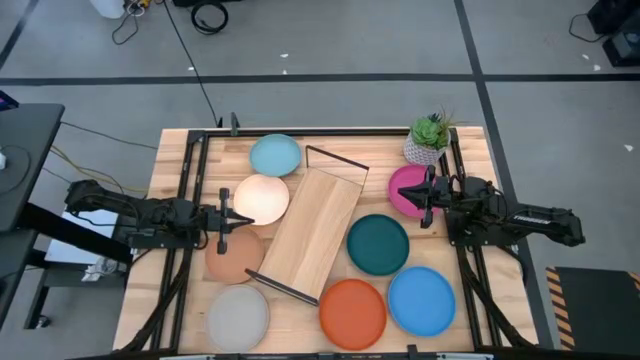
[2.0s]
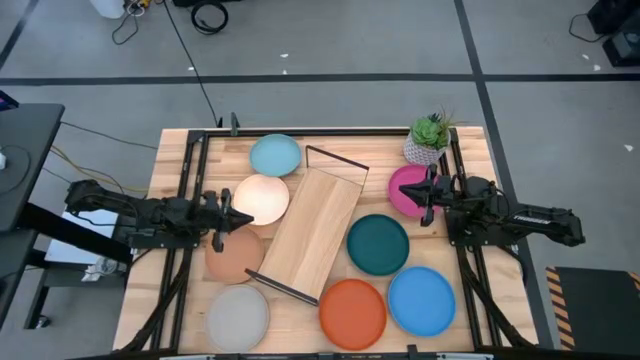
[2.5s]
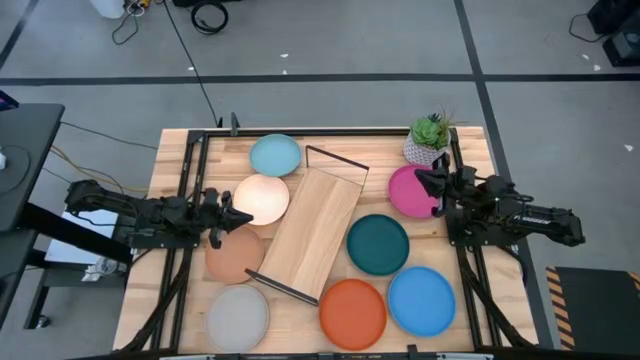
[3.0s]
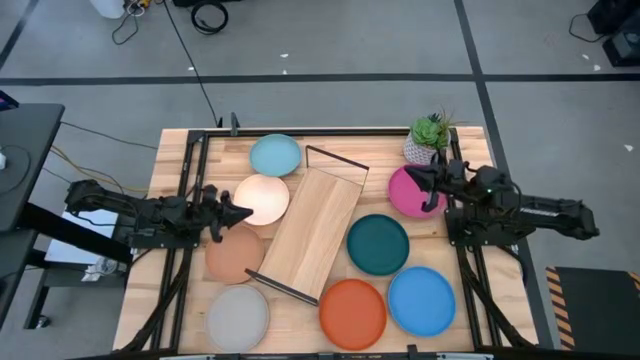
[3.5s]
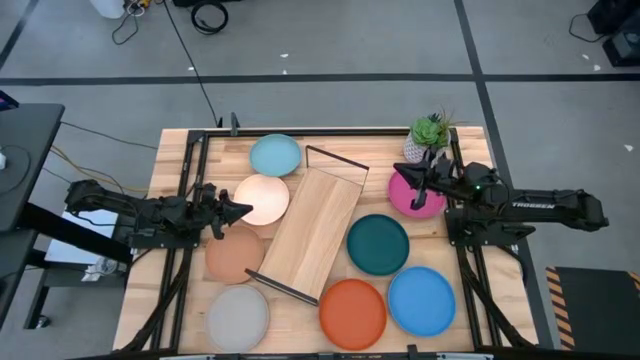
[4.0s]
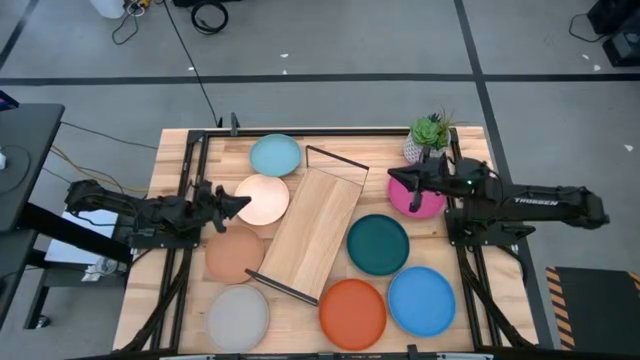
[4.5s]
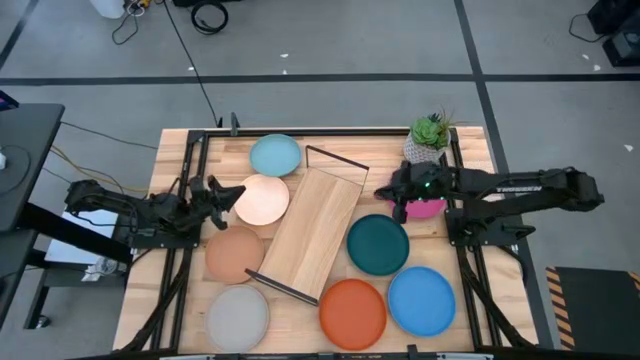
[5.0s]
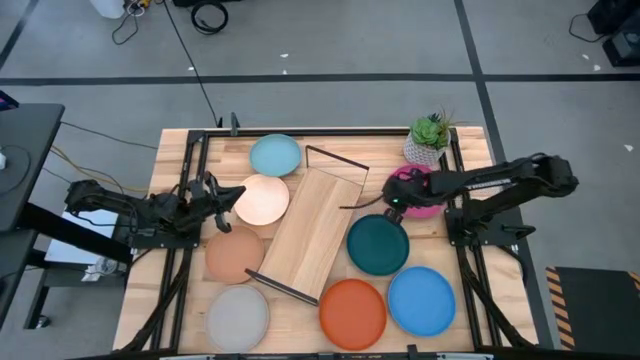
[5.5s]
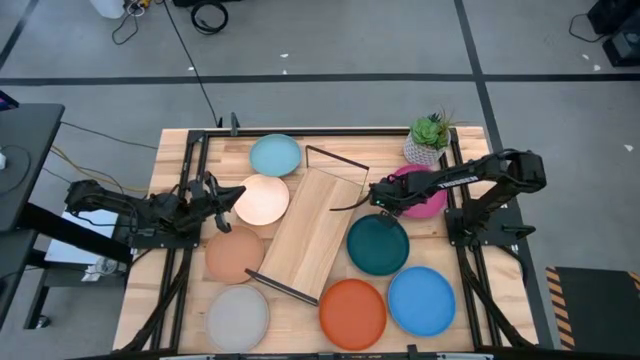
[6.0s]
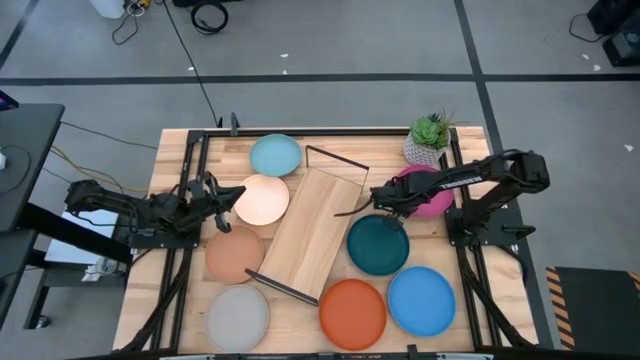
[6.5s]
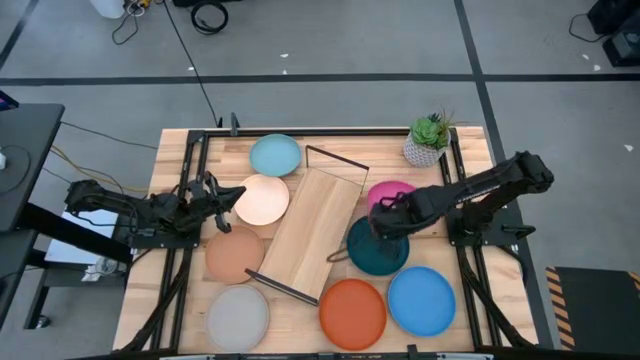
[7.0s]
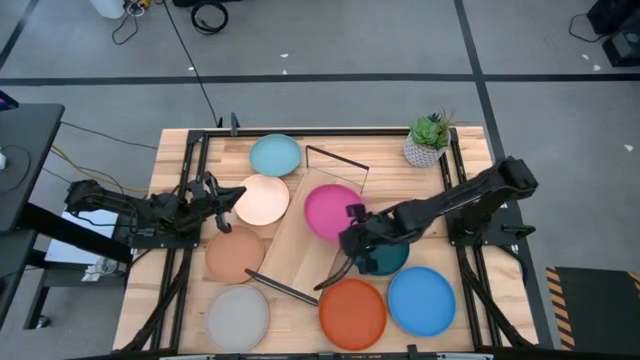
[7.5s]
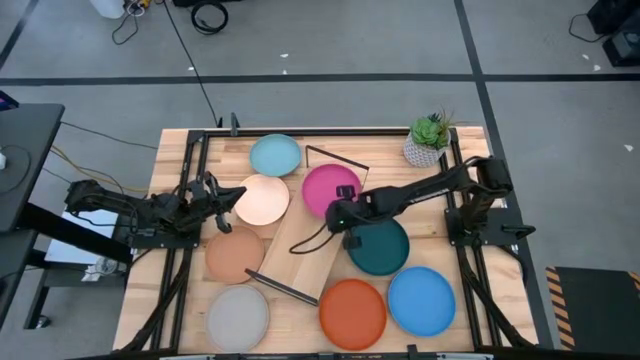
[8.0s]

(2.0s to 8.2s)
Task: Place and stack plates onto a shelf
Put the pink plate on the shelf

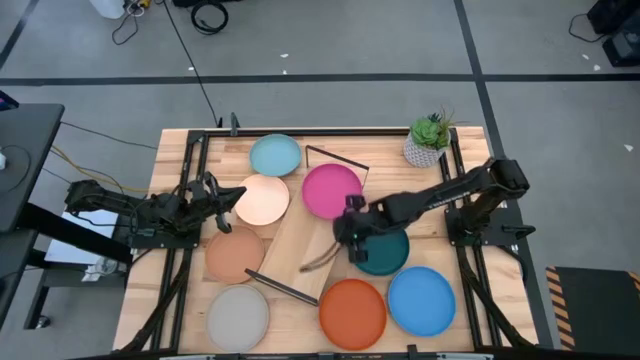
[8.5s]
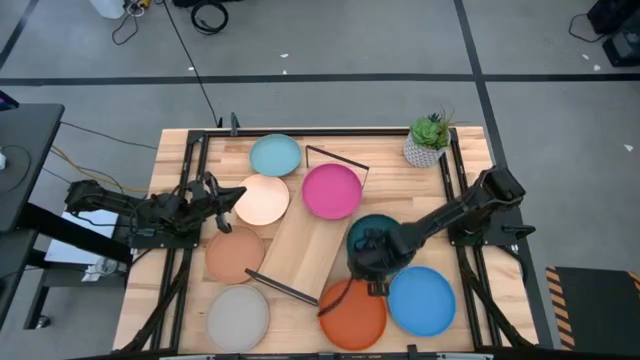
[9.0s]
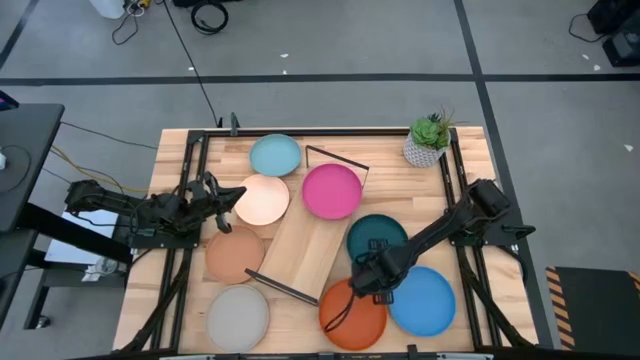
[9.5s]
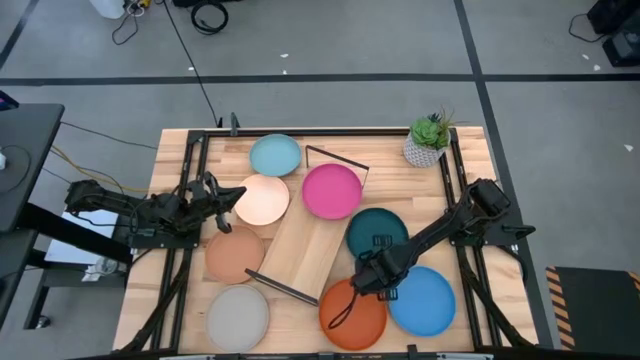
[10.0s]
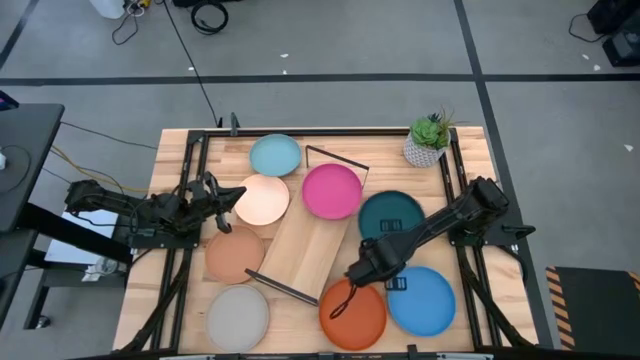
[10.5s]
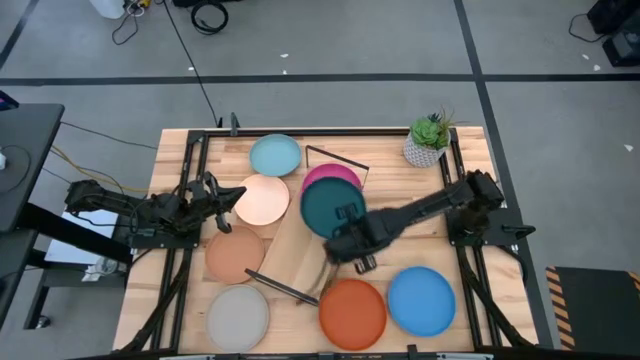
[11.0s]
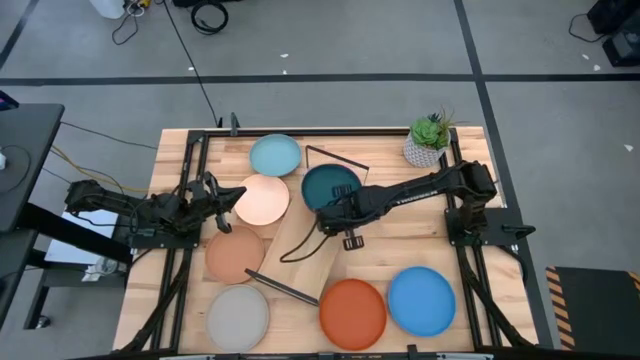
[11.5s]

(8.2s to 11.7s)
Stack the dark green plate on top of the pink plate on the shelf

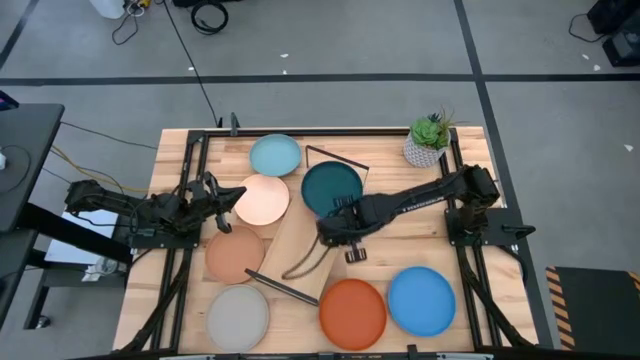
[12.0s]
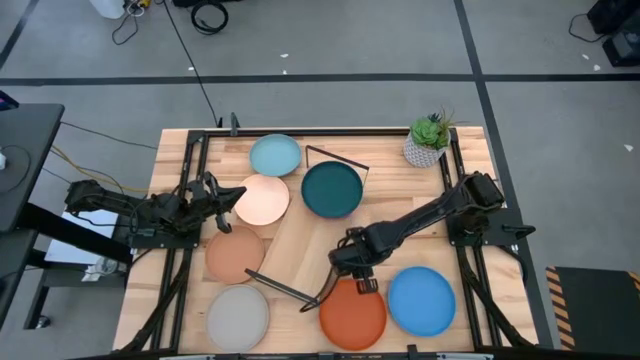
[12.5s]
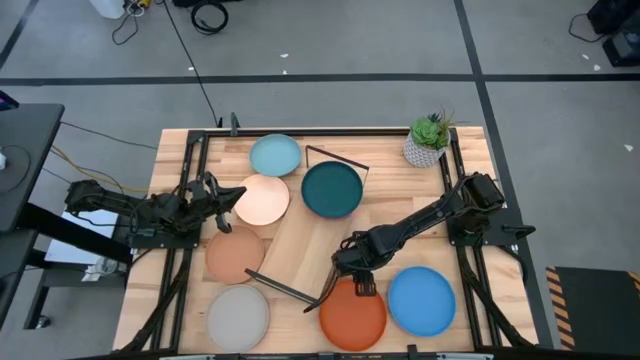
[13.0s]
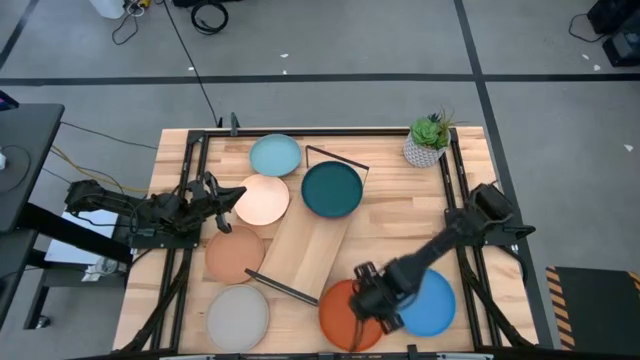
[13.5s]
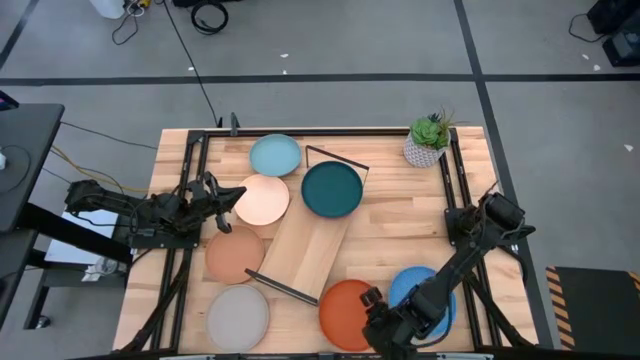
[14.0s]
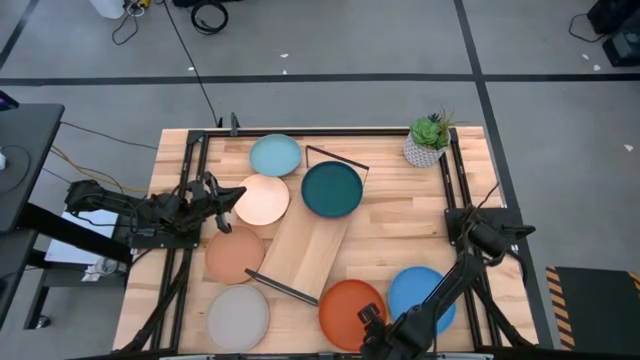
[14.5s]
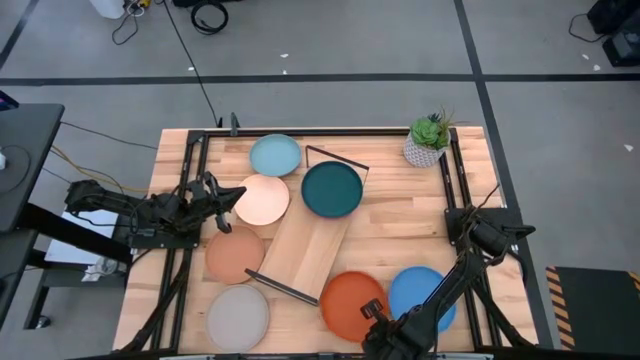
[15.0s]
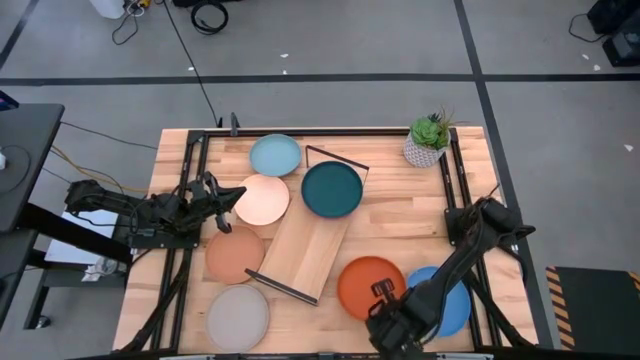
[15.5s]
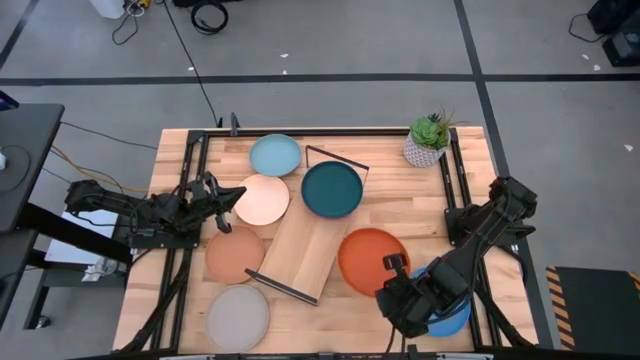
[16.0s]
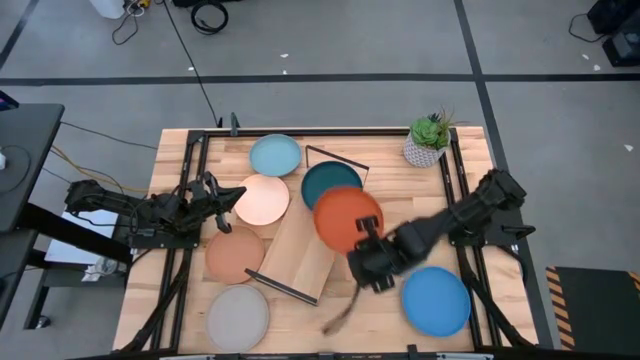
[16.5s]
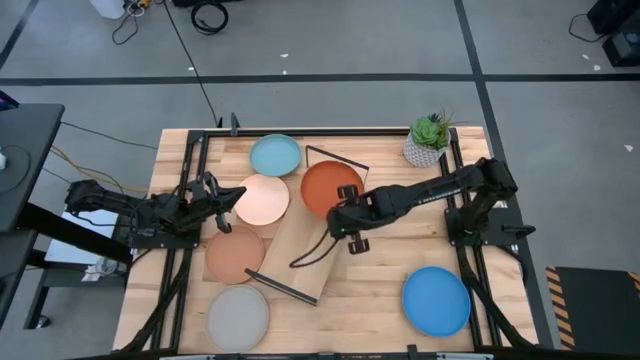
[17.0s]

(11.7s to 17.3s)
Stack the orange plate on top of the dark green plate on the shelf

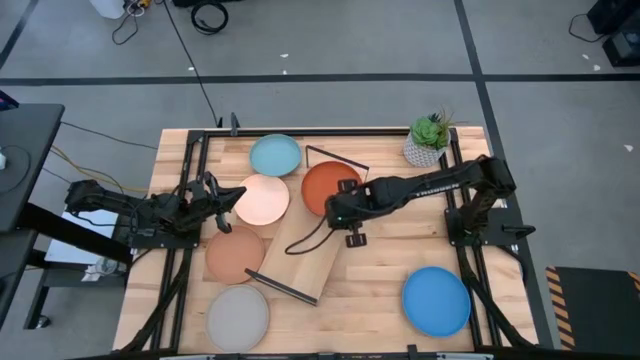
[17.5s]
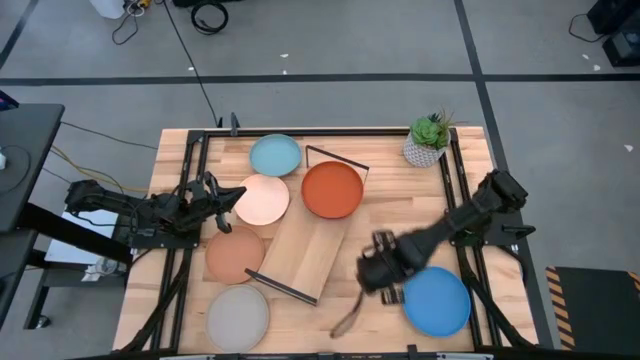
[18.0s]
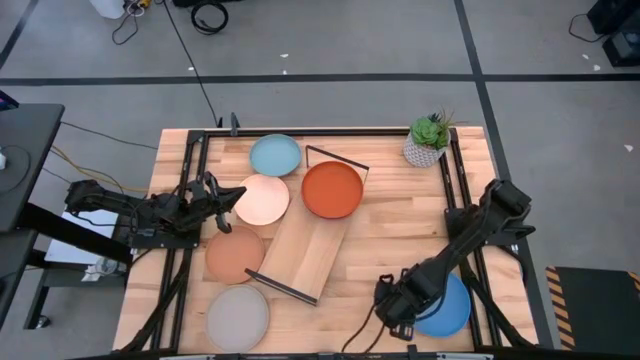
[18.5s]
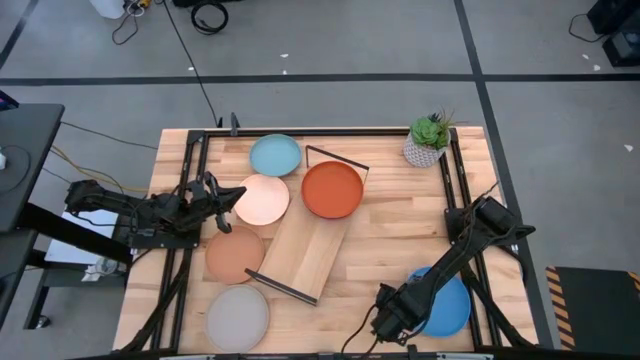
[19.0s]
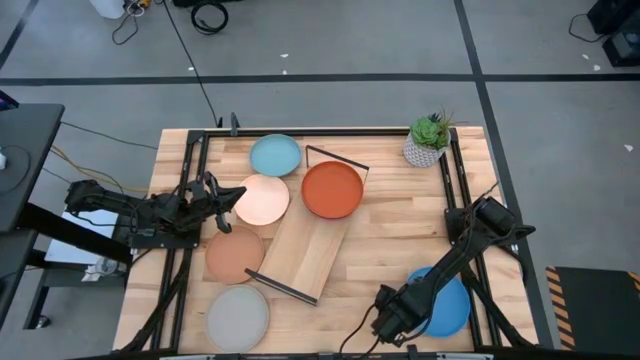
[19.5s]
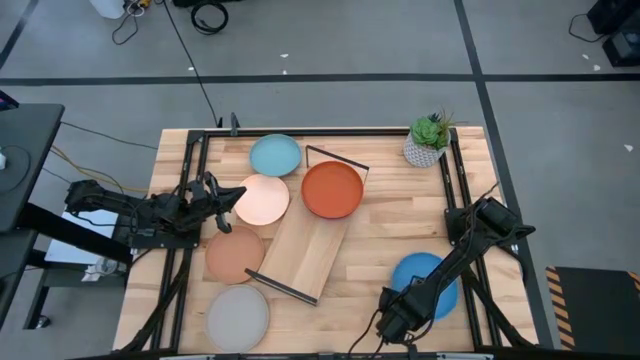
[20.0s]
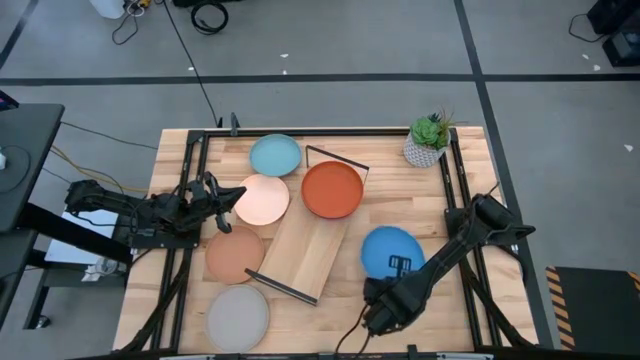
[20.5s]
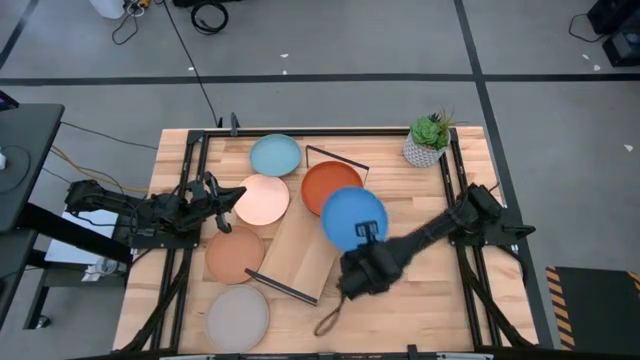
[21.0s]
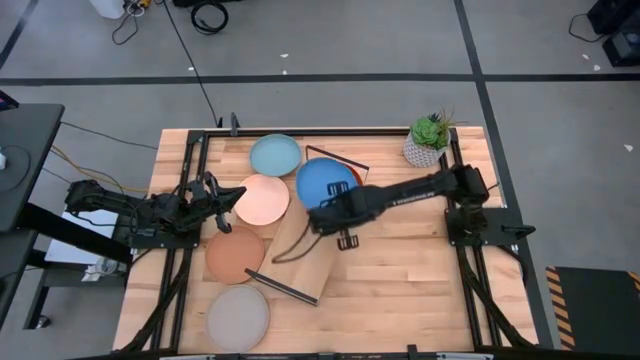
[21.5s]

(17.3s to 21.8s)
Stack the blue plate on top of the orange plate on the shelf
